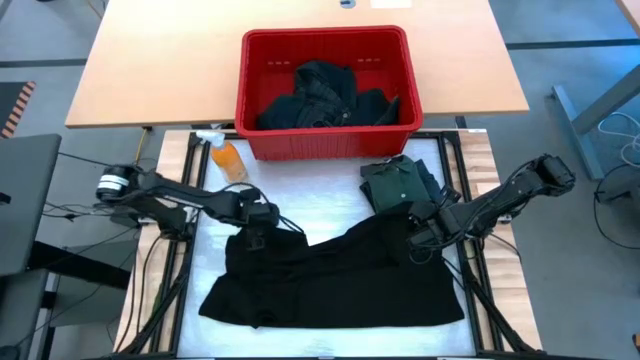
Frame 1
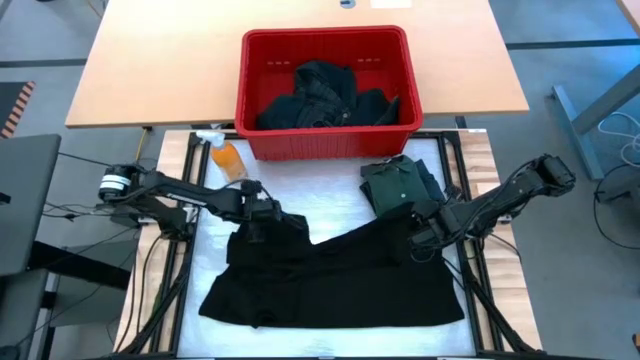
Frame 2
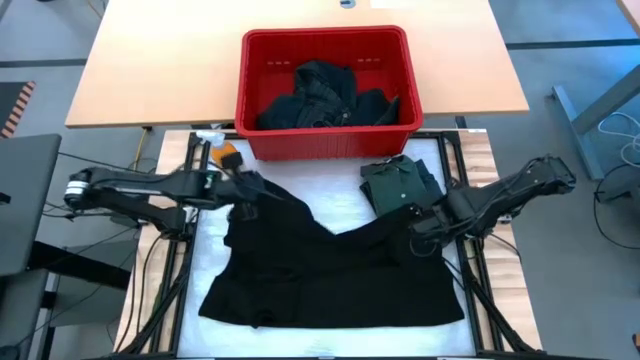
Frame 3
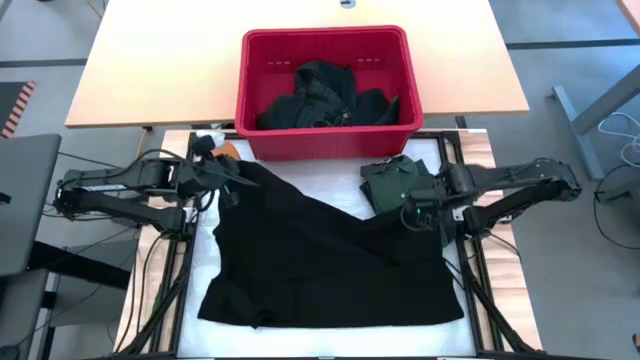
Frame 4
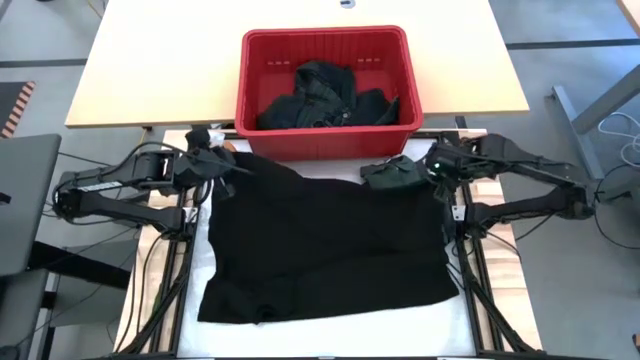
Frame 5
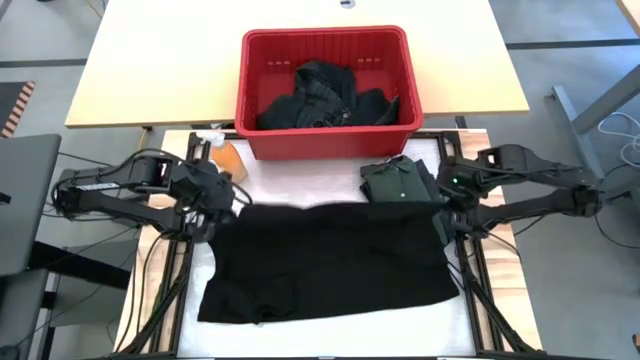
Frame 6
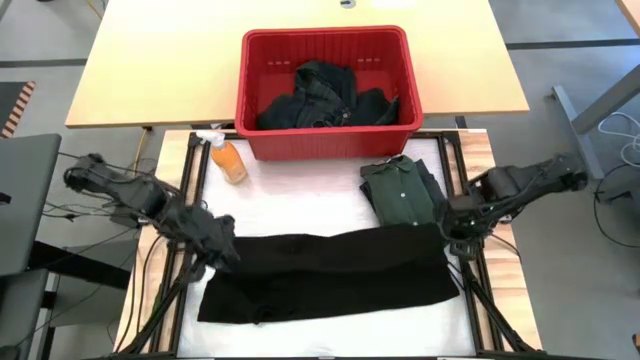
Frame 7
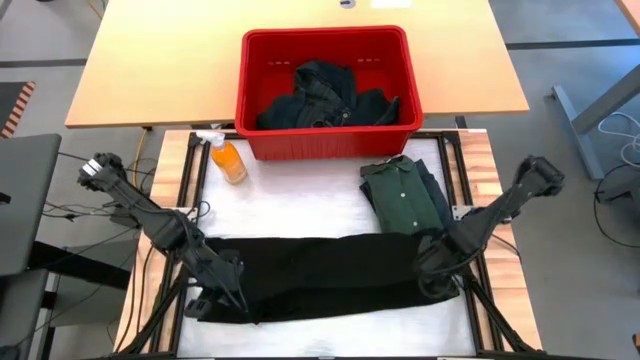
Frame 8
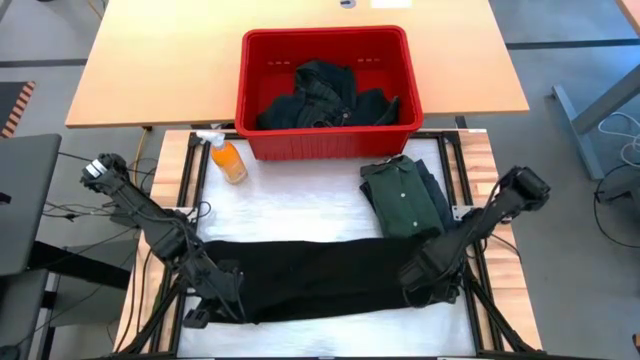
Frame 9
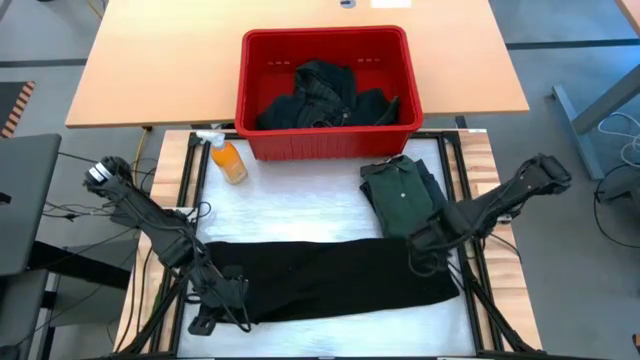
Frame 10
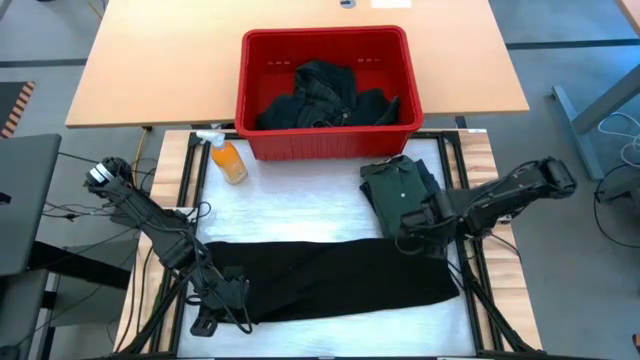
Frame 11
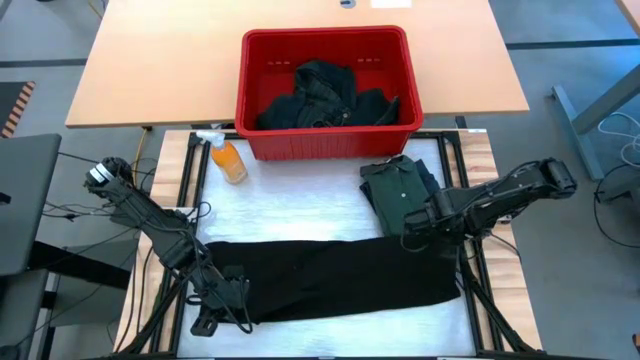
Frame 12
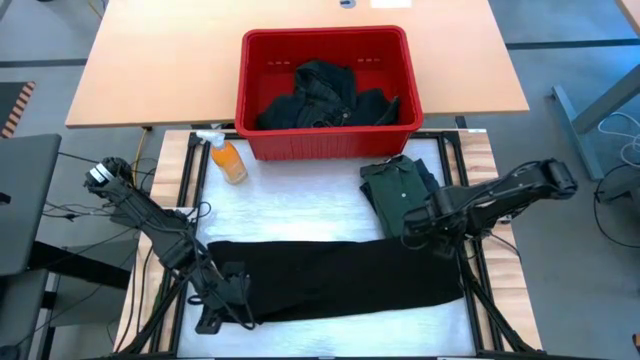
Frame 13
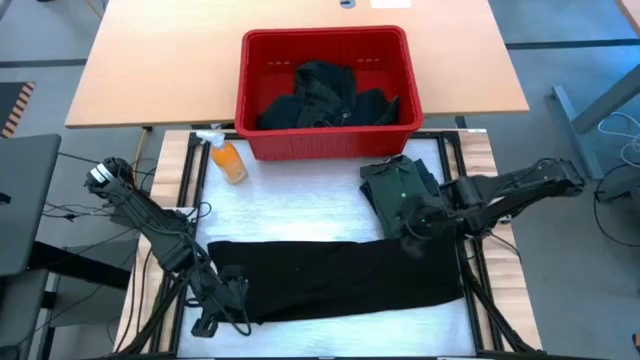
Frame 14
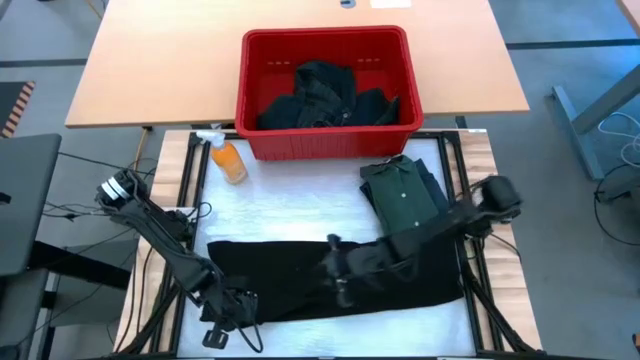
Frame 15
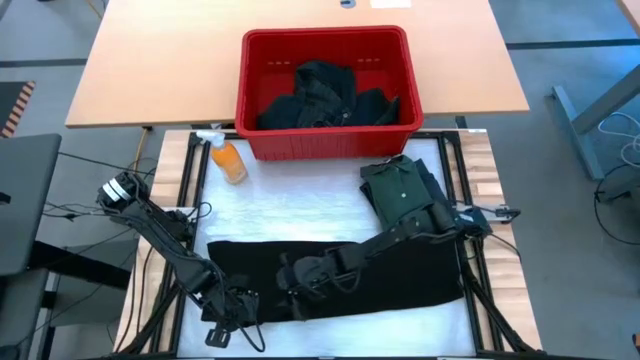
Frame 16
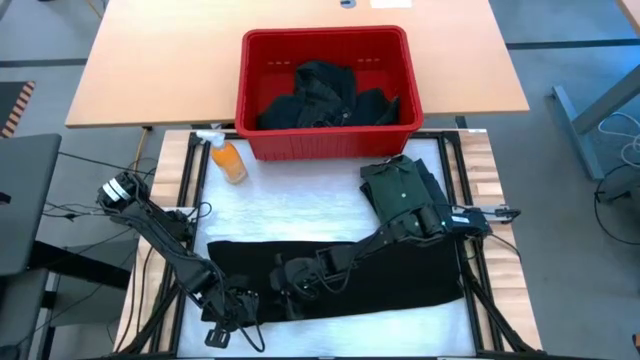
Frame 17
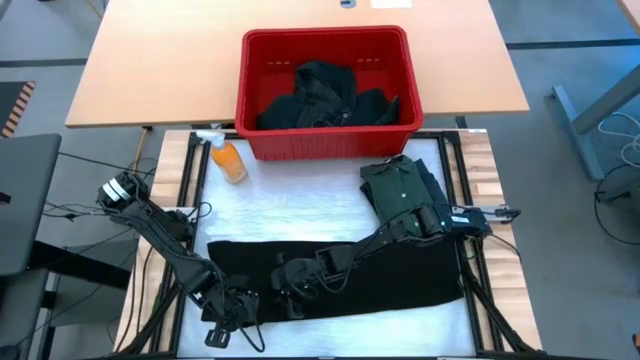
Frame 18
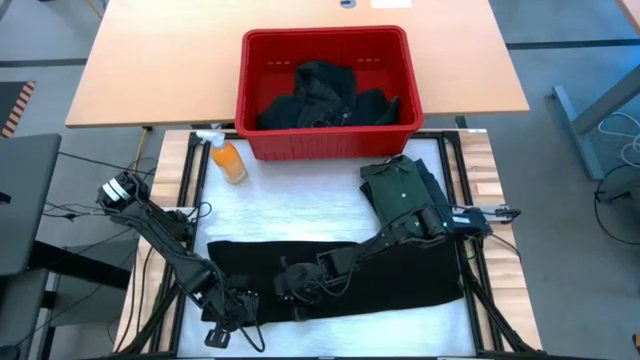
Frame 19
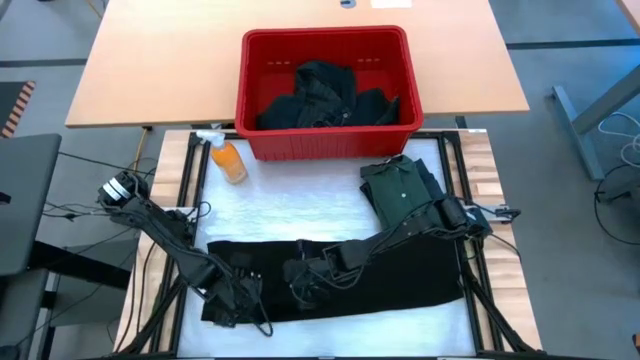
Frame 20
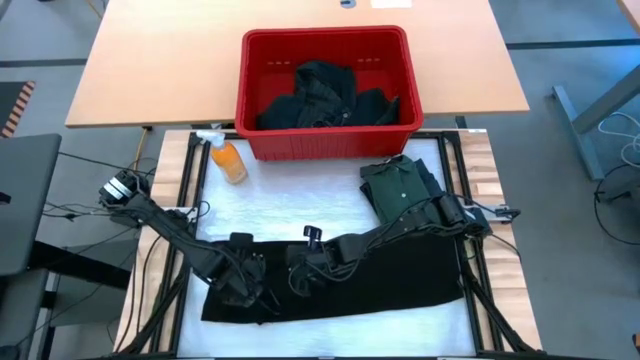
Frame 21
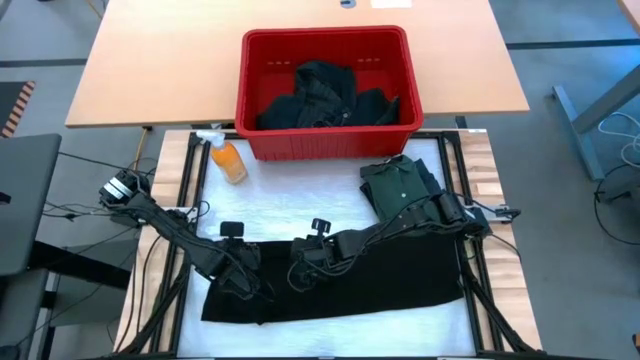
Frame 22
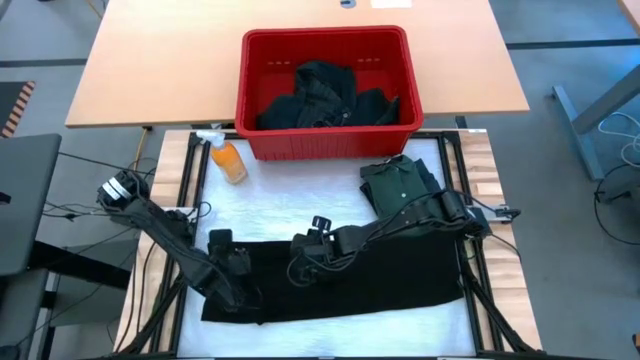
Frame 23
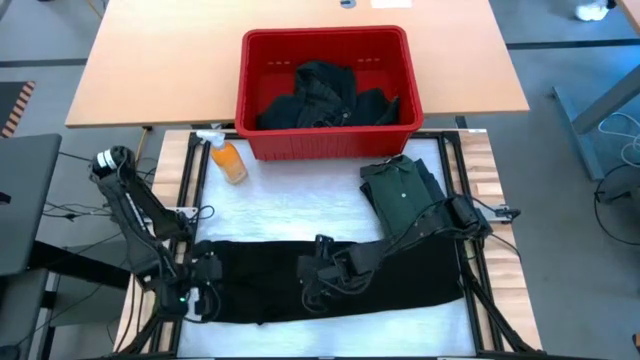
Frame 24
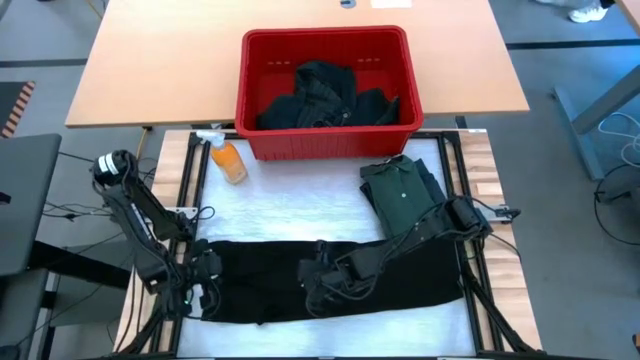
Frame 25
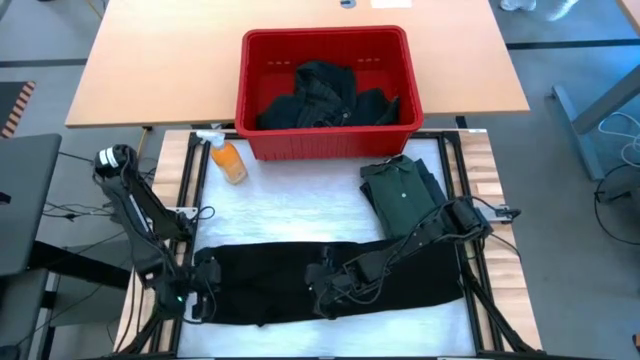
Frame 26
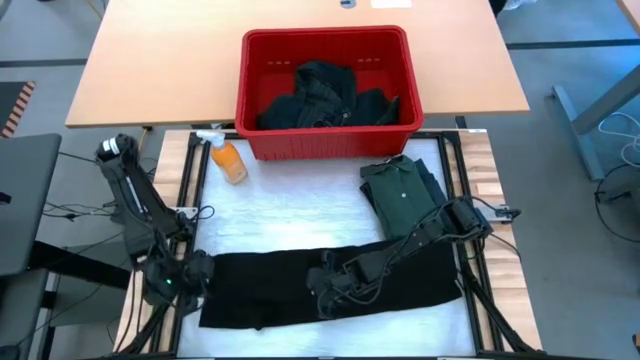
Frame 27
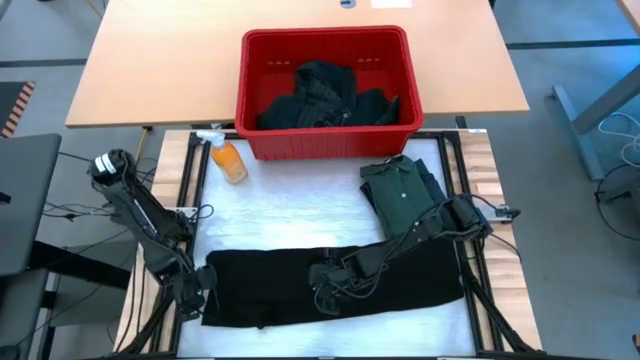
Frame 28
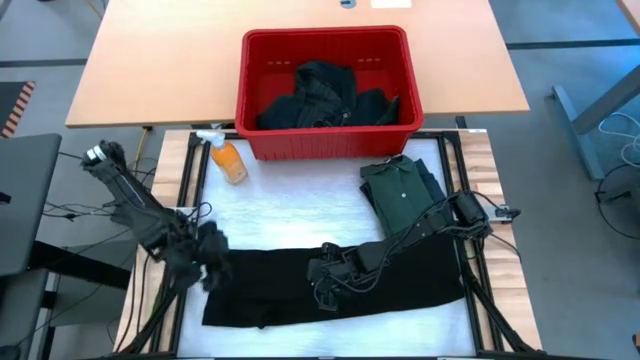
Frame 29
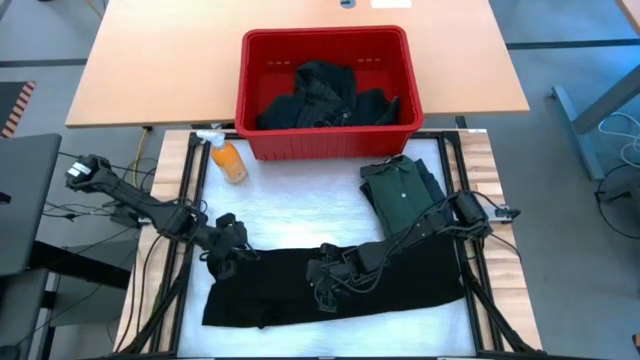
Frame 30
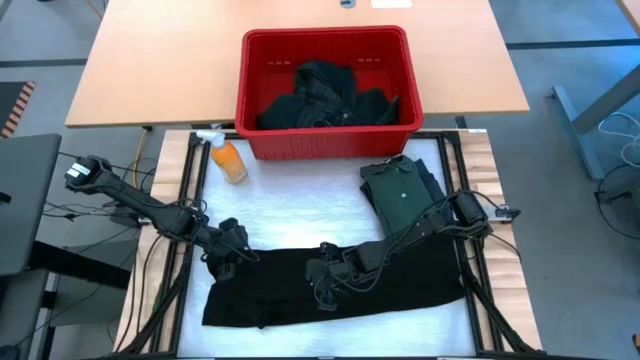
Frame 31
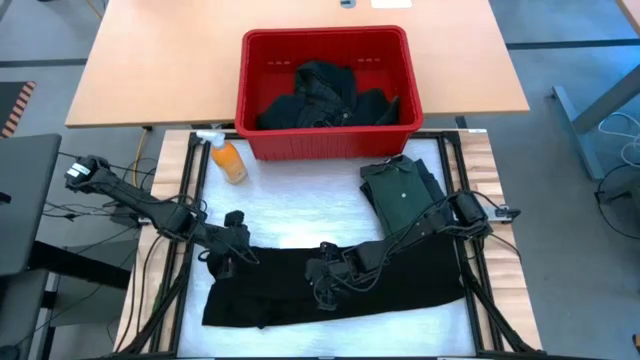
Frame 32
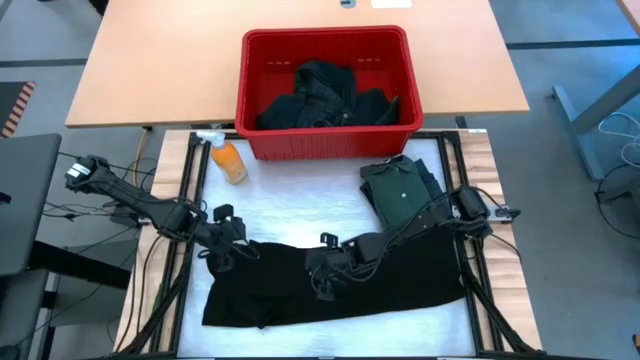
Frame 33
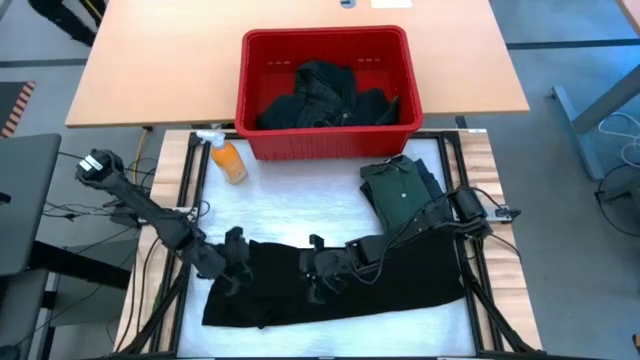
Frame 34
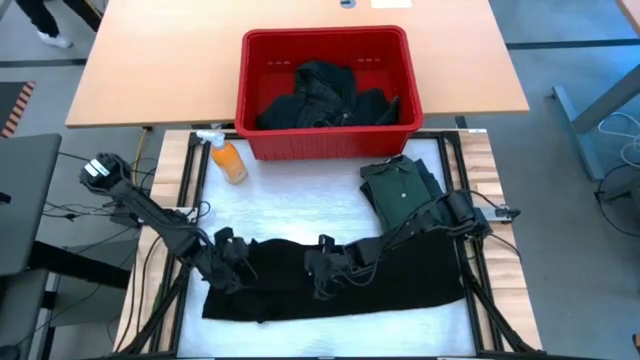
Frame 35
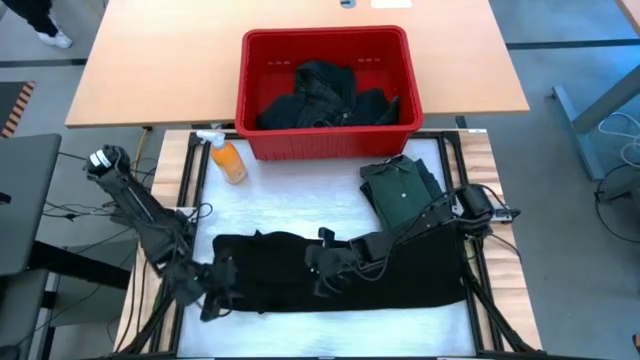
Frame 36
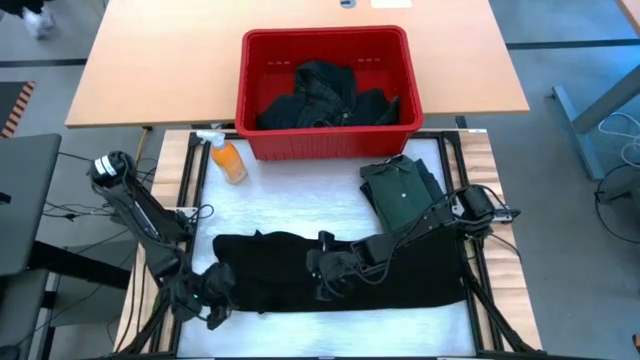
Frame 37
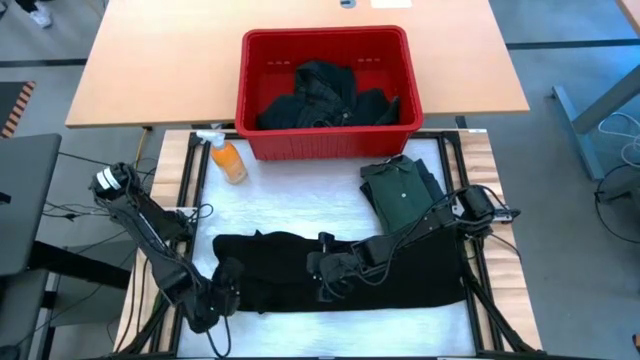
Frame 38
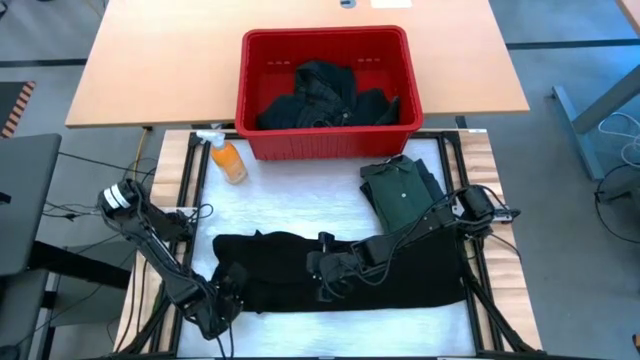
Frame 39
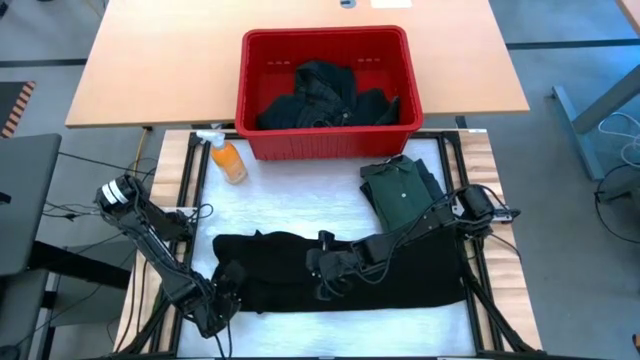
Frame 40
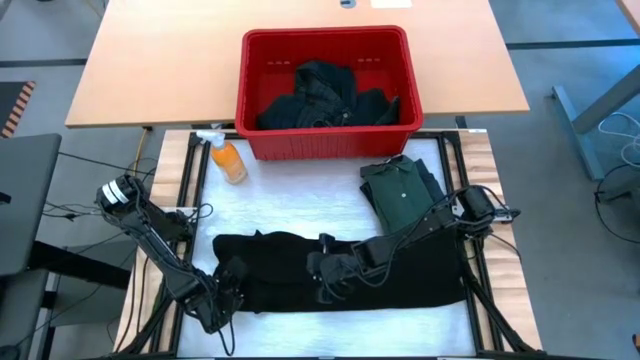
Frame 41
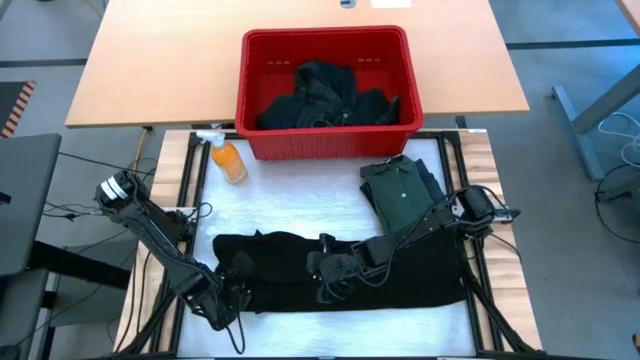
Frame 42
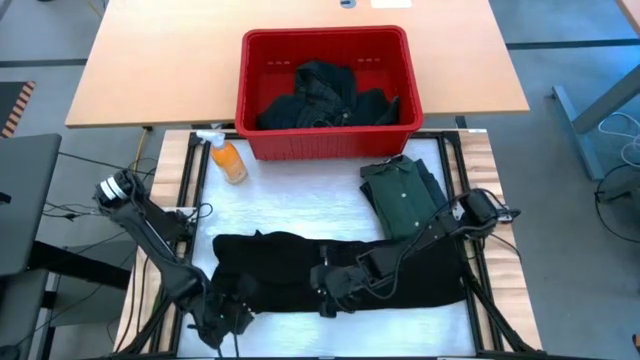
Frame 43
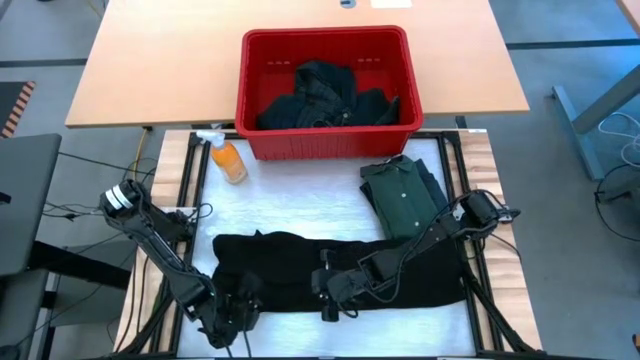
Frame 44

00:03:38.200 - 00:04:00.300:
Task: Fold laundry
Fold the black shirt
